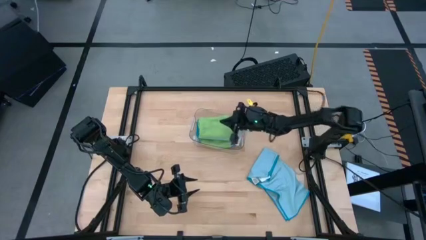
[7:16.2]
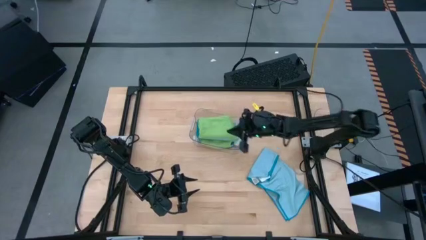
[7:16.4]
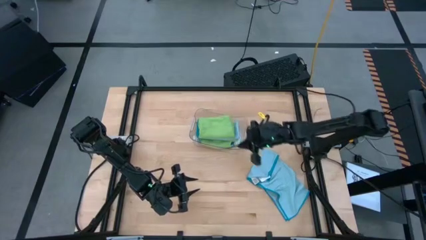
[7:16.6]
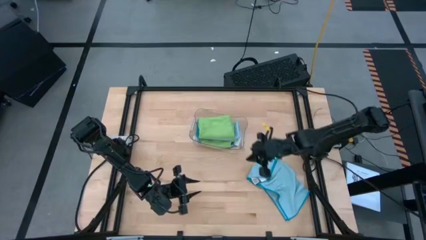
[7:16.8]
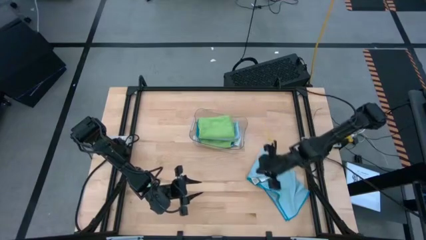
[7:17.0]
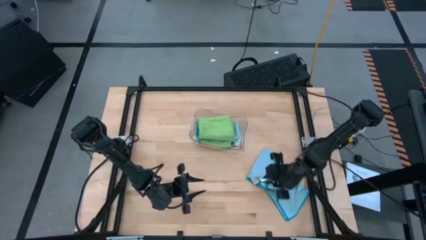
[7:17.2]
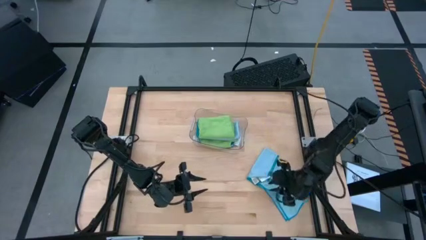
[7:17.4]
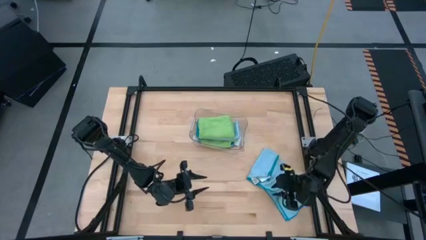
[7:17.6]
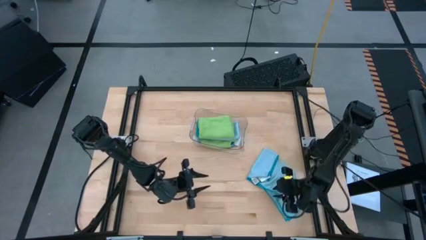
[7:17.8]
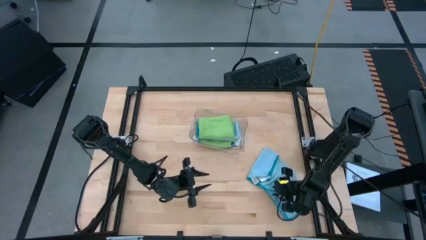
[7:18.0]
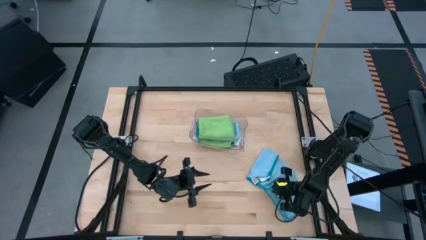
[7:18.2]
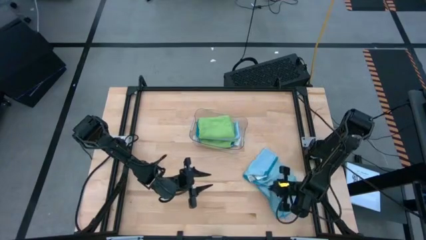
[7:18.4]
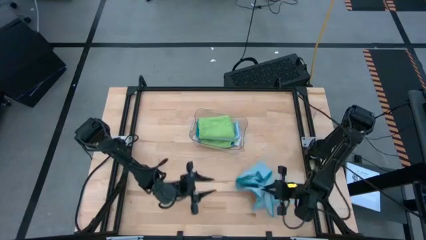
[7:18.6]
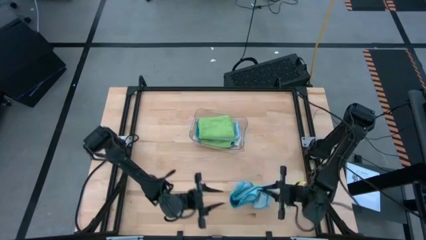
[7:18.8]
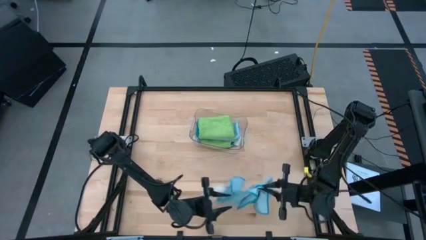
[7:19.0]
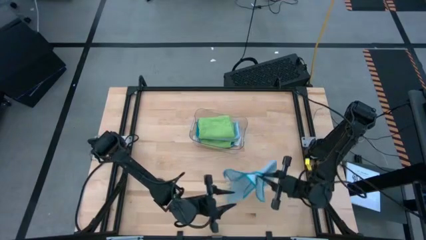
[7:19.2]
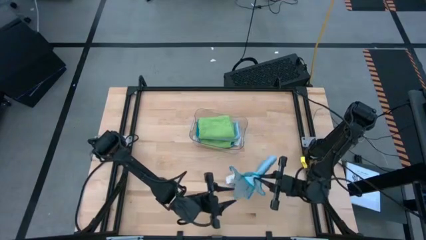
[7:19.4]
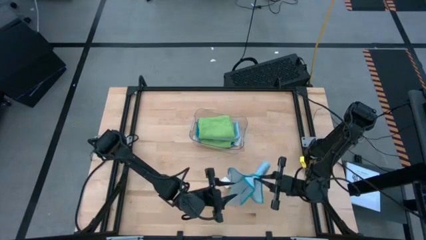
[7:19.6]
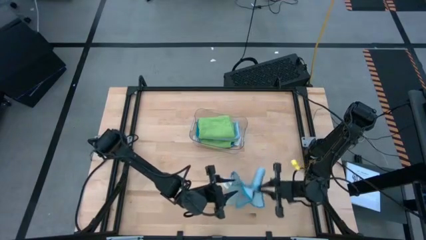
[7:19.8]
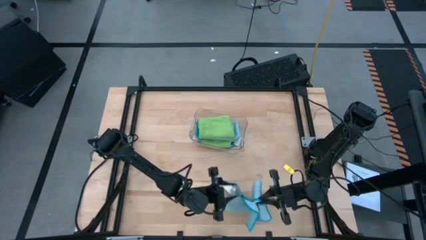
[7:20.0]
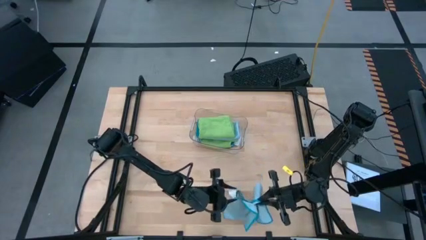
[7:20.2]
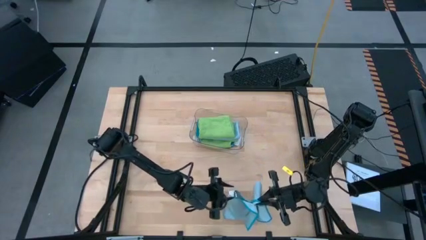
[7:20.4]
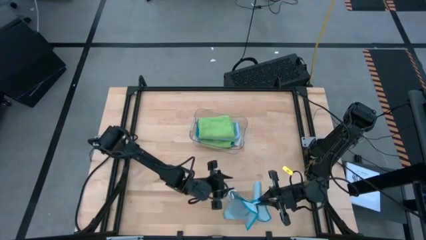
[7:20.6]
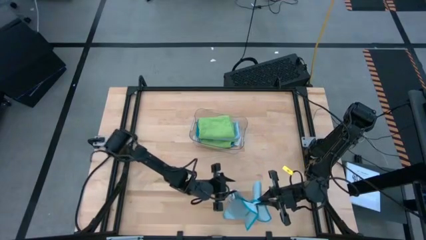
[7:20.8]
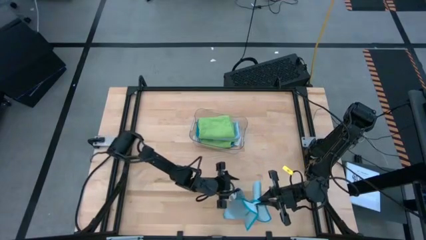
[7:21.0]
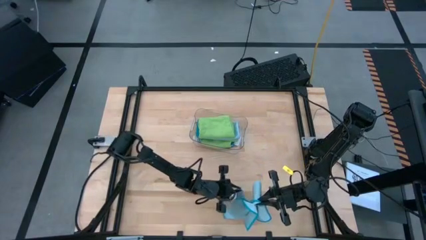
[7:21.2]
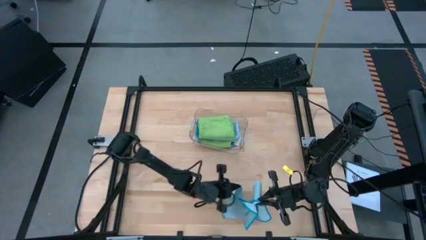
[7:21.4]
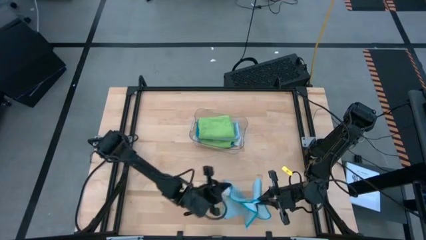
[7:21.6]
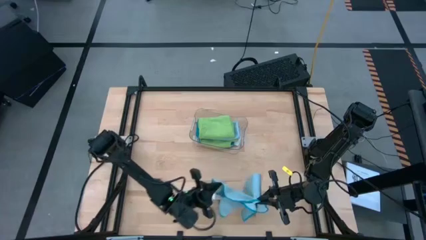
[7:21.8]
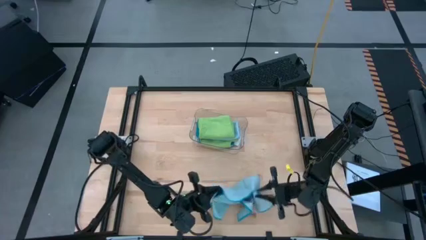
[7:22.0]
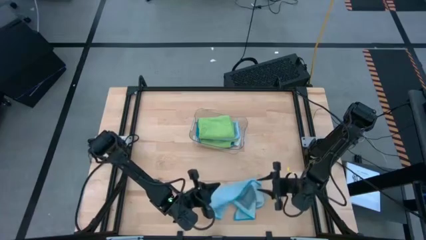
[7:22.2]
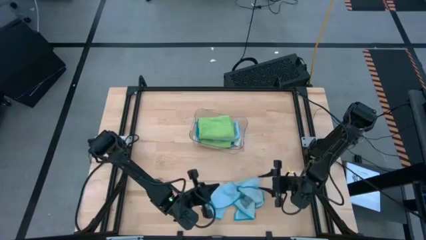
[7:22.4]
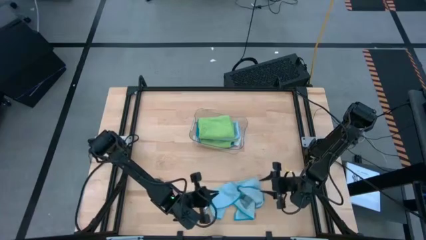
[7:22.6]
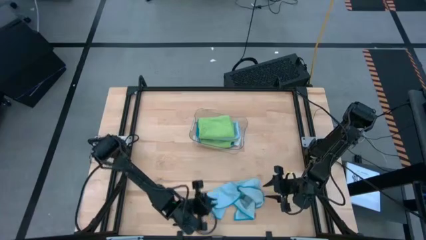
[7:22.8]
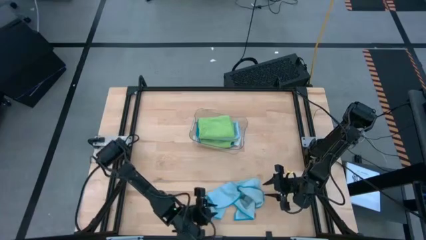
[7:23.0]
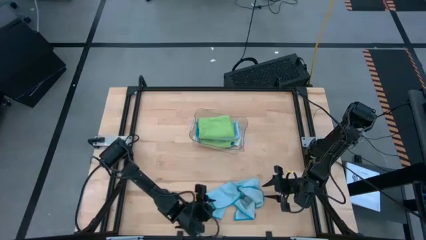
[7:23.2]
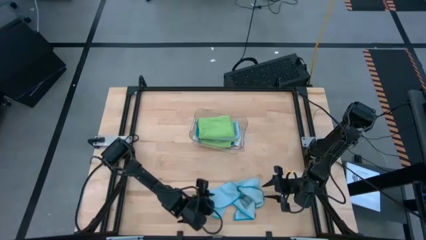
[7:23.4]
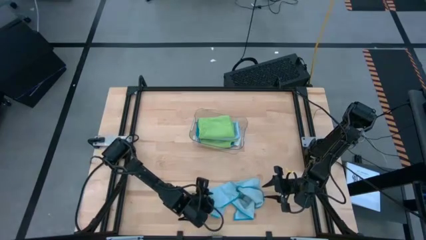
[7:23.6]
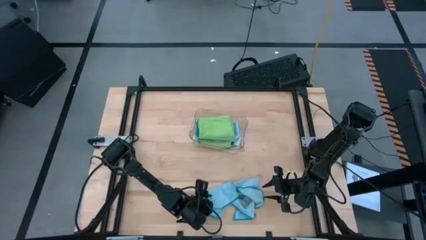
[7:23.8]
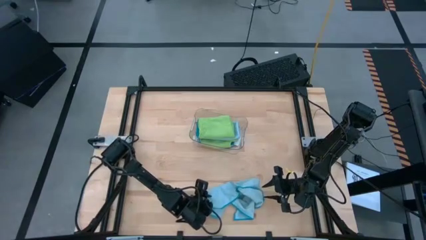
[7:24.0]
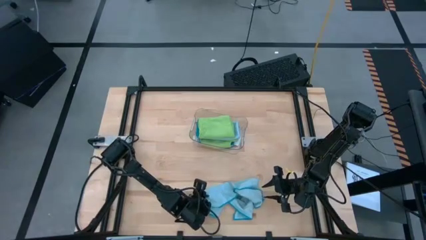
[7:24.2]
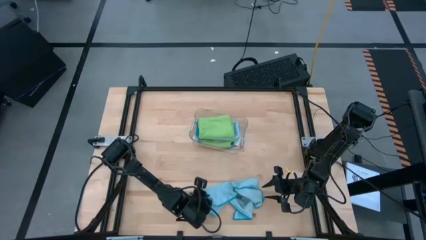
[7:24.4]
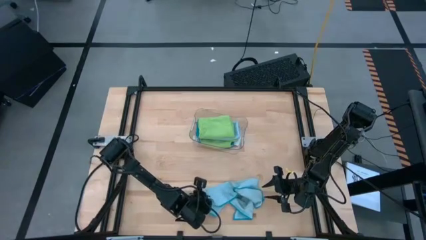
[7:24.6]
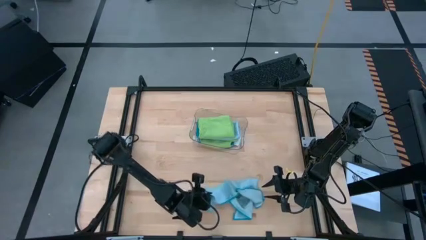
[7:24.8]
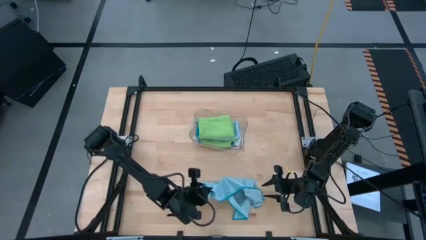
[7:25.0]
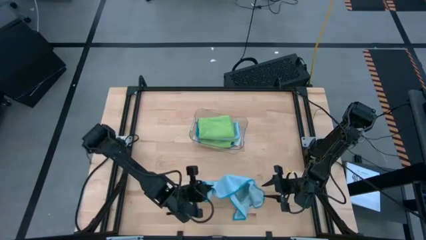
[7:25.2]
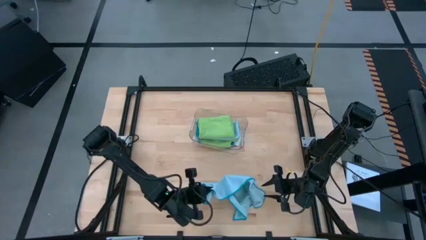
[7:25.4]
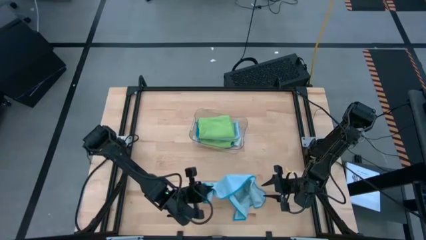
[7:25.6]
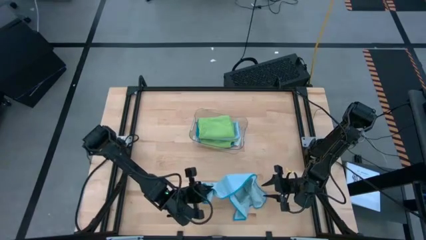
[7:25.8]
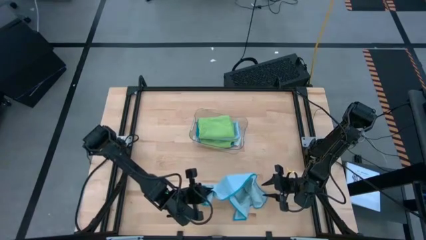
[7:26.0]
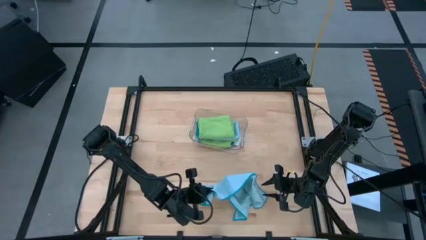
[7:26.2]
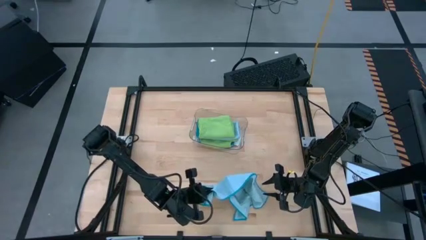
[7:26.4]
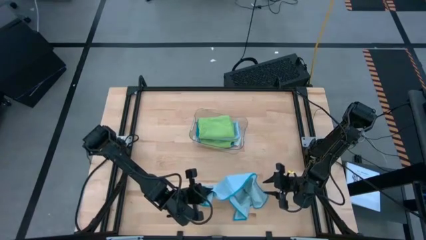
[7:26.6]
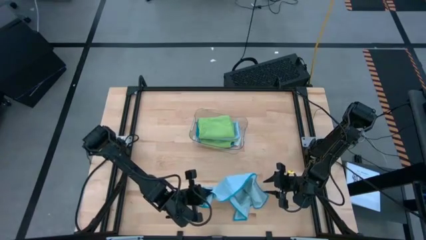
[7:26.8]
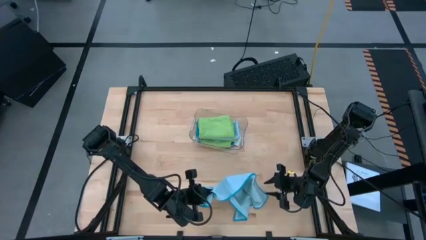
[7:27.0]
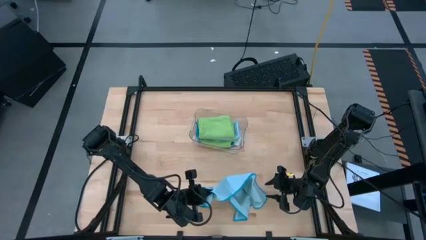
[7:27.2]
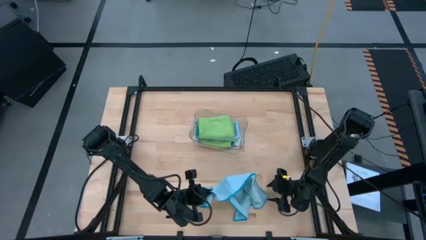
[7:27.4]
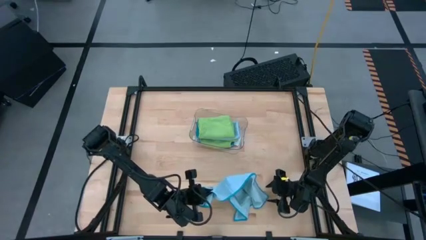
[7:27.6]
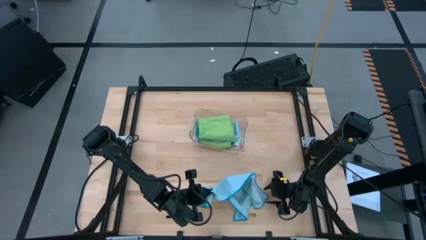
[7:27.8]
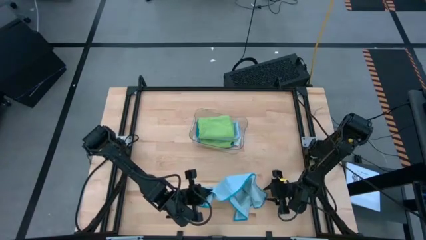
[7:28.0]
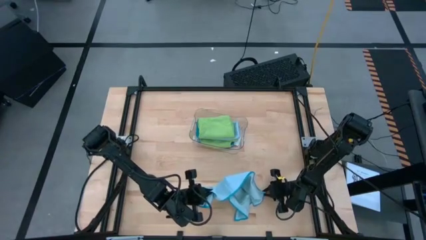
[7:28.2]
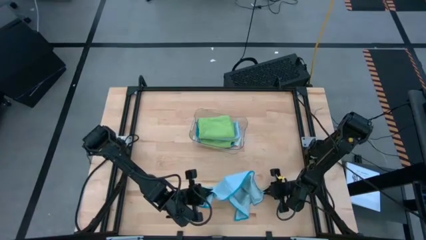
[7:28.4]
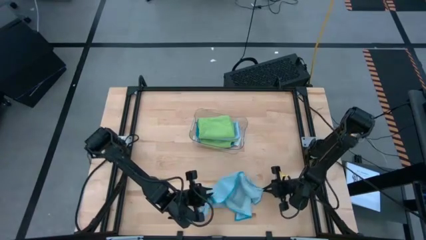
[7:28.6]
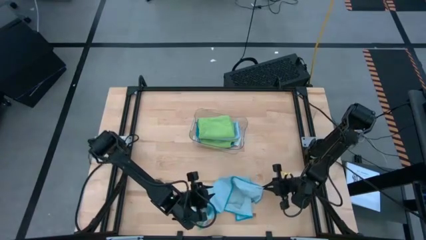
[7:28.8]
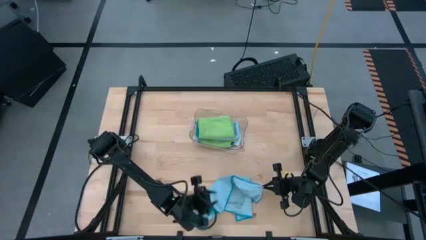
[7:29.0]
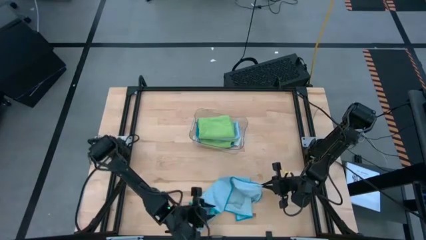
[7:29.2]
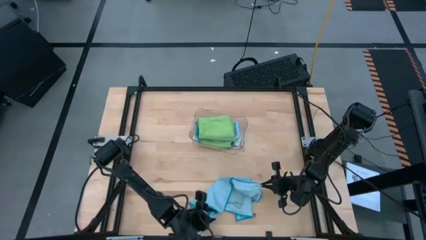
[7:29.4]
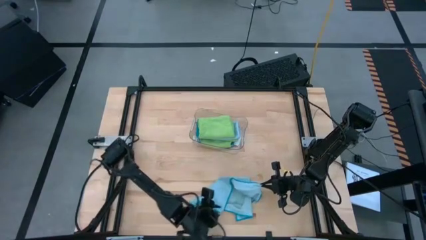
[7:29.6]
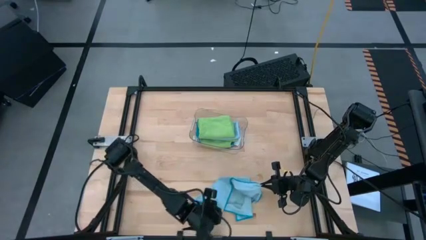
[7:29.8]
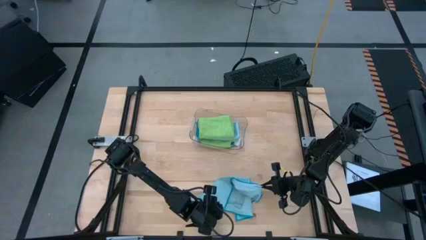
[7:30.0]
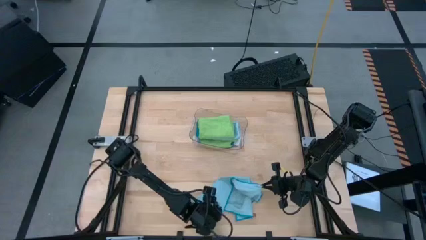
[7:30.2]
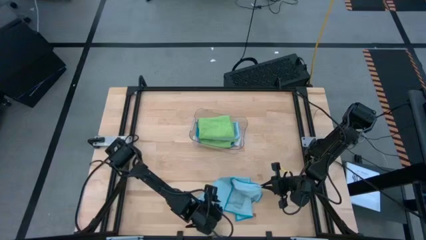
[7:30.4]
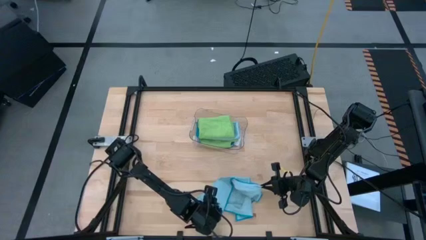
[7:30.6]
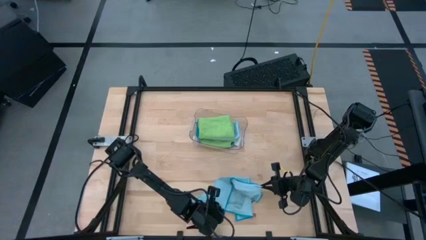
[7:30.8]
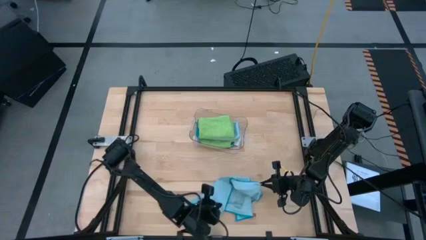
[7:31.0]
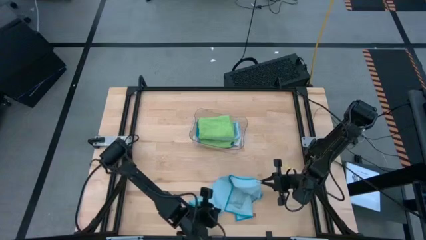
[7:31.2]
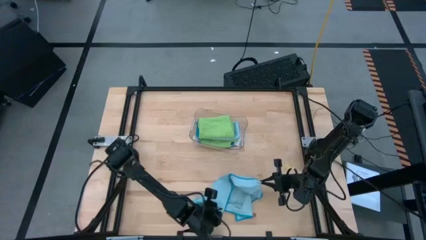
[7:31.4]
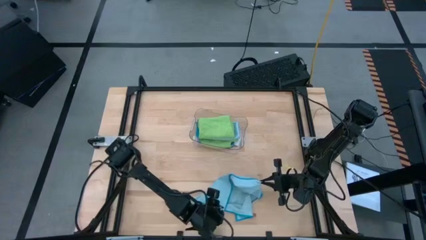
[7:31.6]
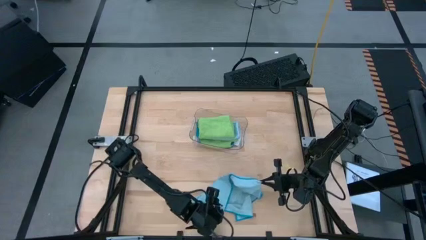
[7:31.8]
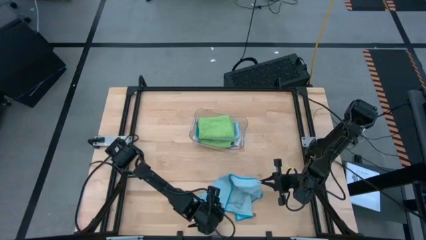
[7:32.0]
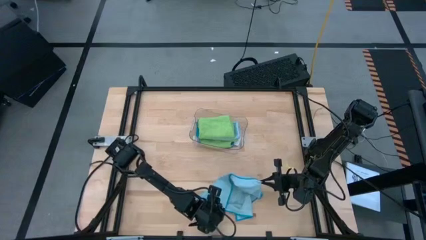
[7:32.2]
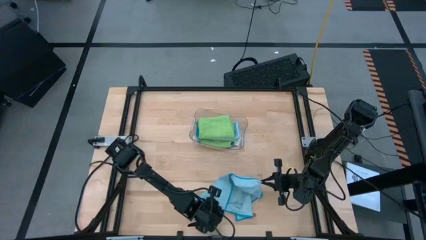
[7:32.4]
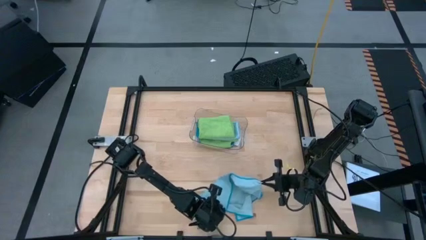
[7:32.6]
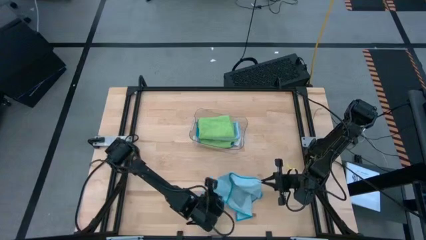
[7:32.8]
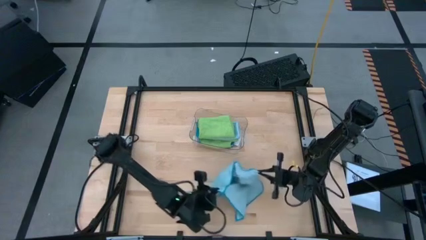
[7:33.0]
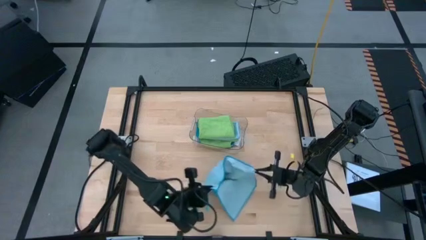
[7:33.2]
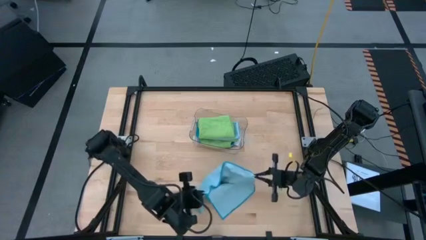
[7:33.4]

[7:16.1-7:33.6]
Task: Fold microfiber towels
Fold the blue microfiber cloth
